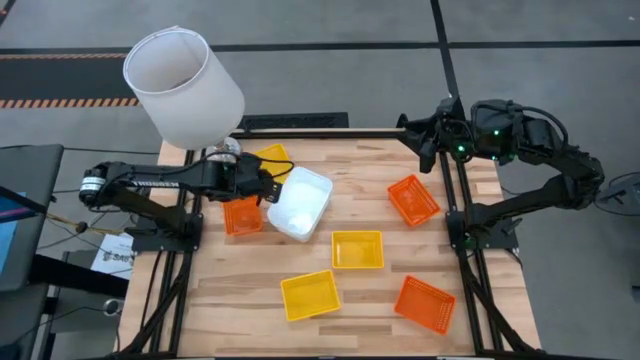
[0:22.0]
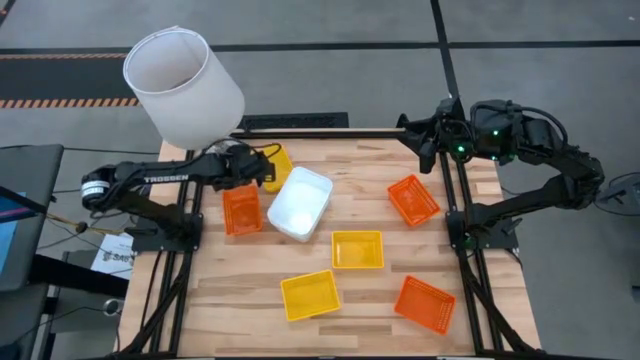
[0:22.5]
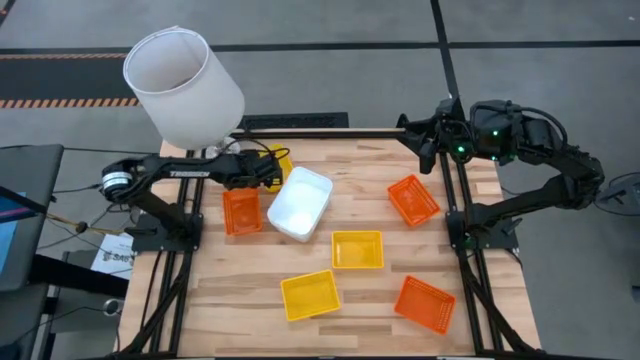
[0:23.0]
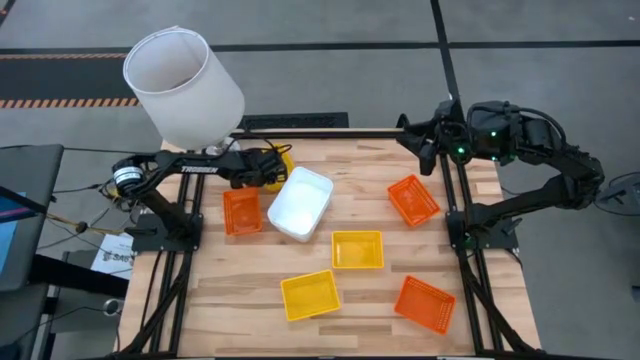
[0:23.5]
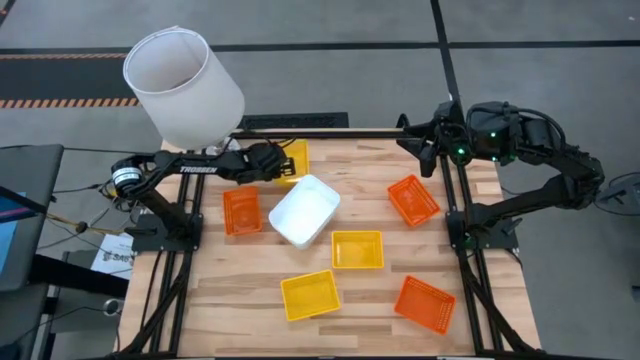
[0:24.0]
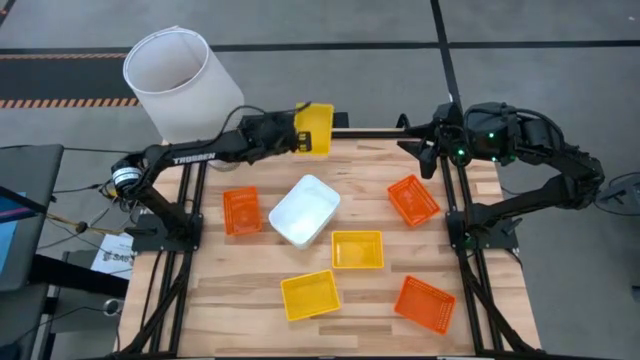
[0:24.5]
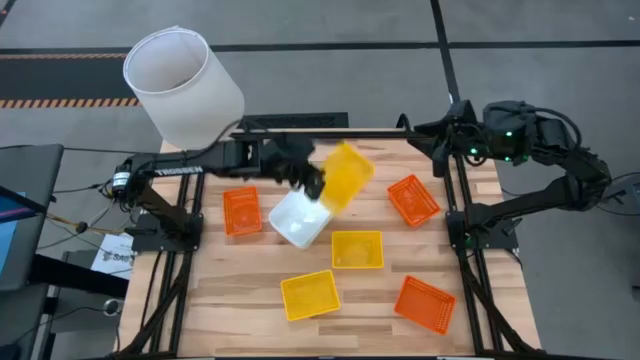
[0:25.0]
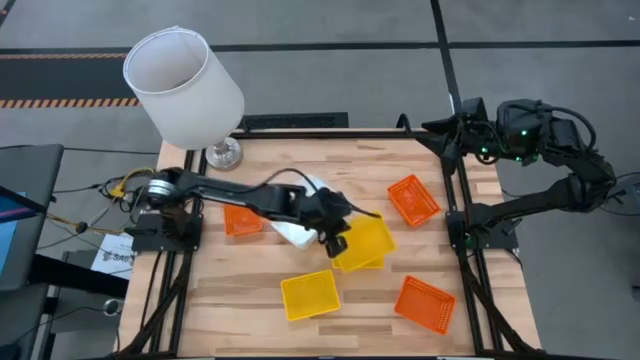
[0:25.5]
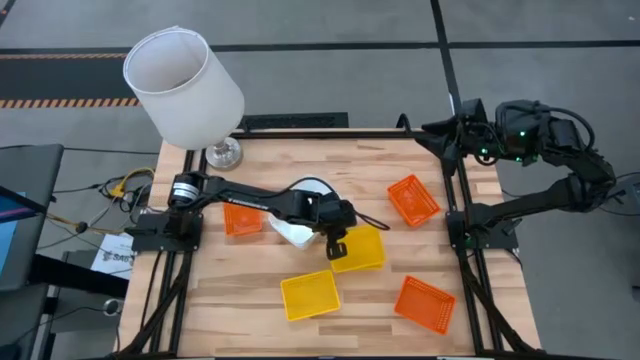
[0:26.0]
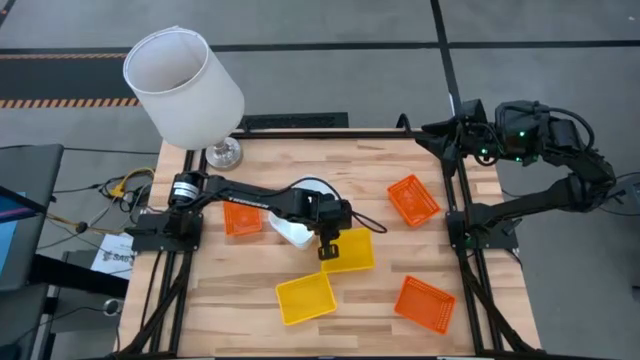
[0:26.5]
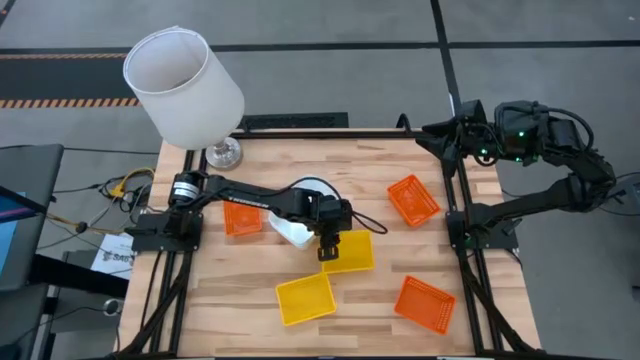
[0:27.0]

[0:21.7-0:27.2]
Stack the top yellow bin on top of the middle yellow bin

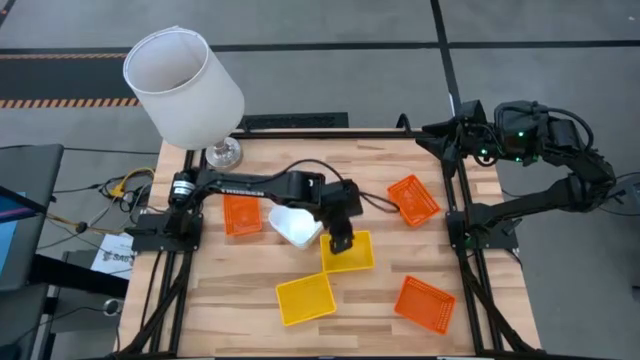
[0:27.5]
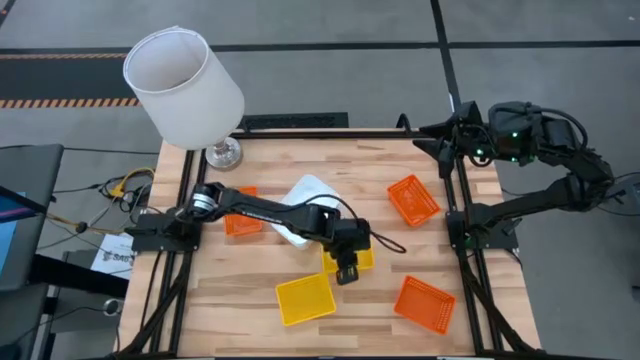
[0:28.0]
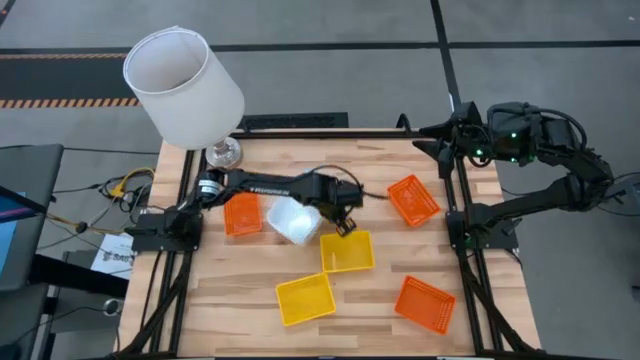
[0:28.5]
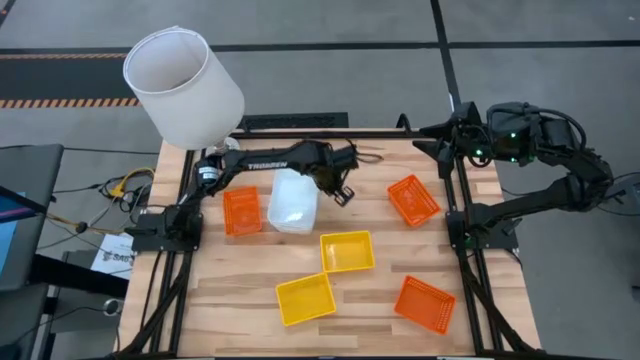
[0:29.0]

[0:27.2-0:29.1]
Adjust the stacked white bins

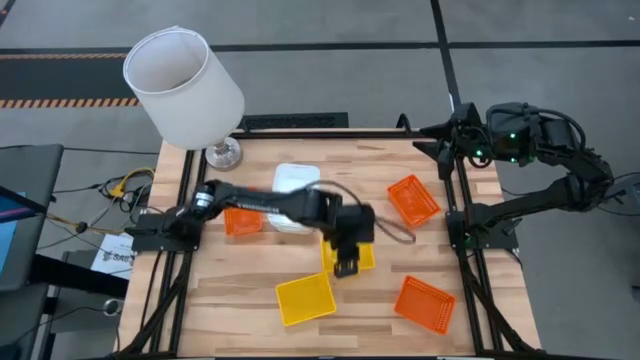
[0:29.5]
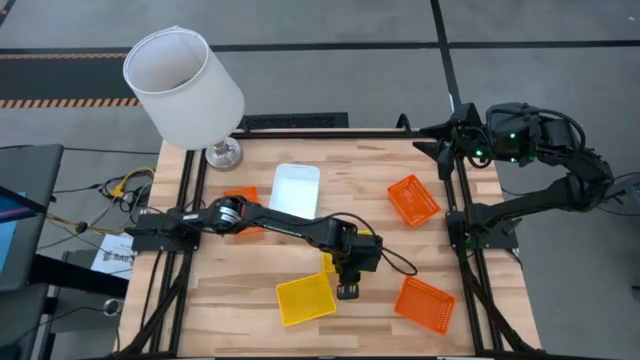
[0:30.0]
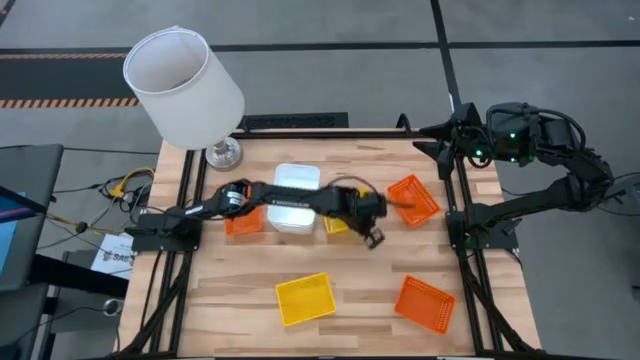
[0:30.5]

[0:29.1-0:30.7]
Adjust the stacked yellow bins

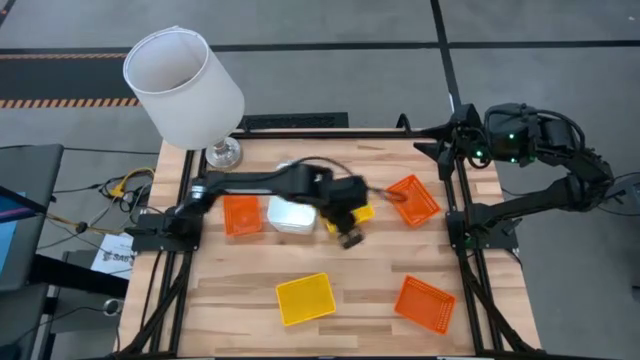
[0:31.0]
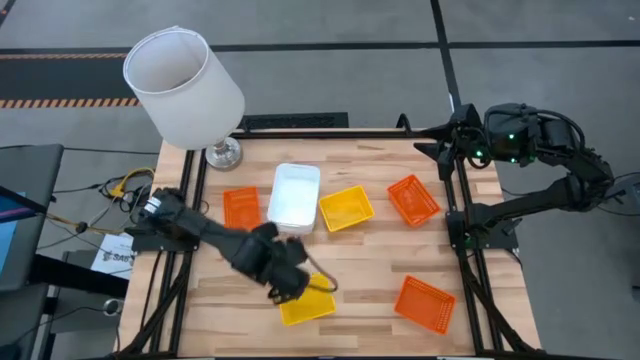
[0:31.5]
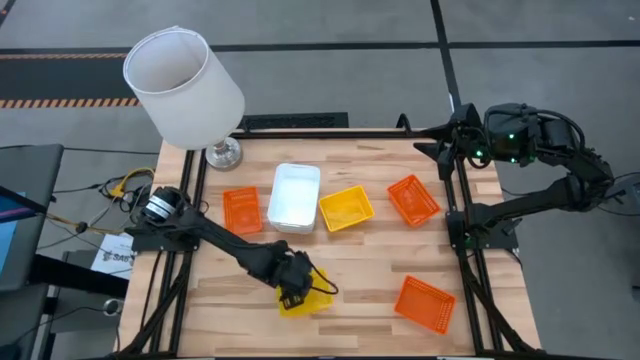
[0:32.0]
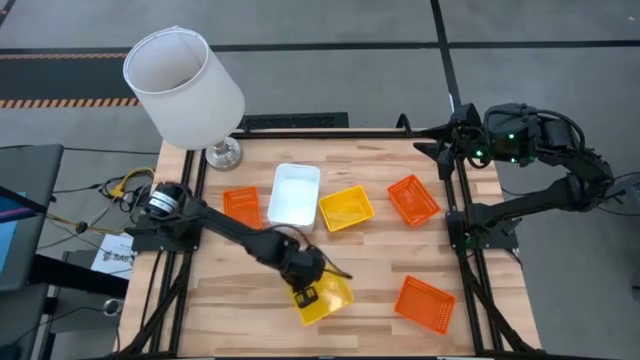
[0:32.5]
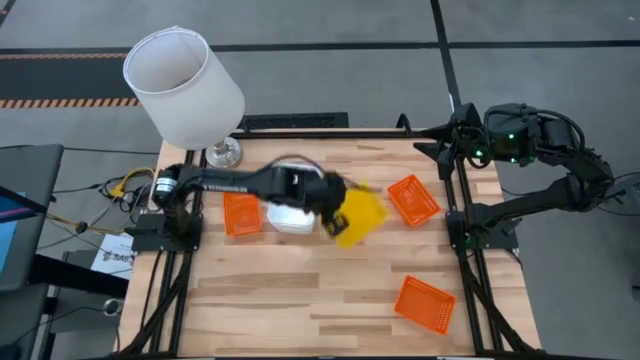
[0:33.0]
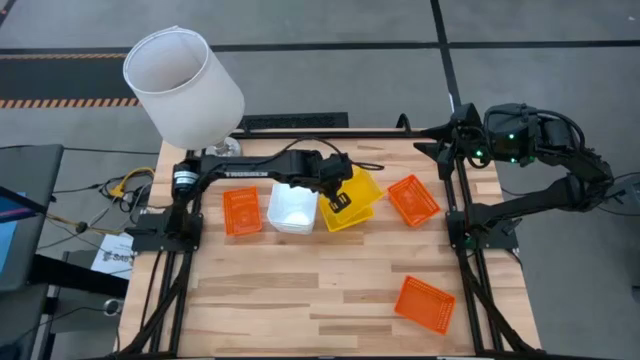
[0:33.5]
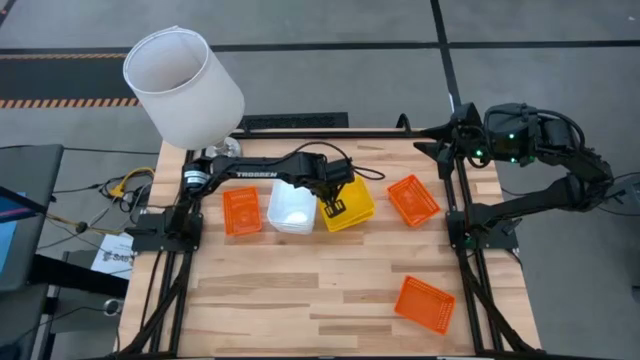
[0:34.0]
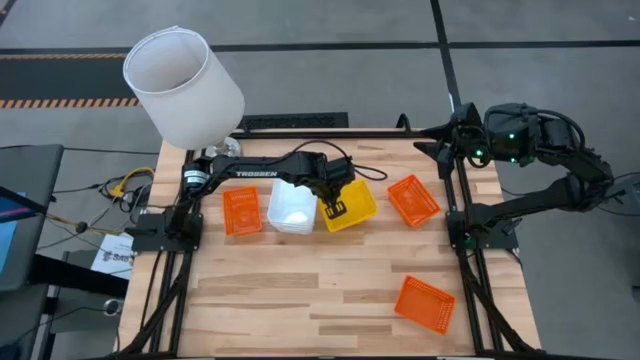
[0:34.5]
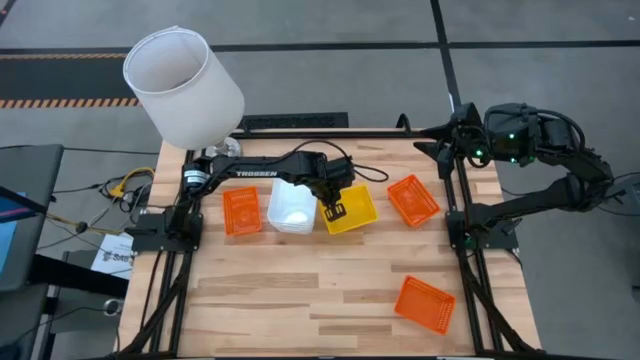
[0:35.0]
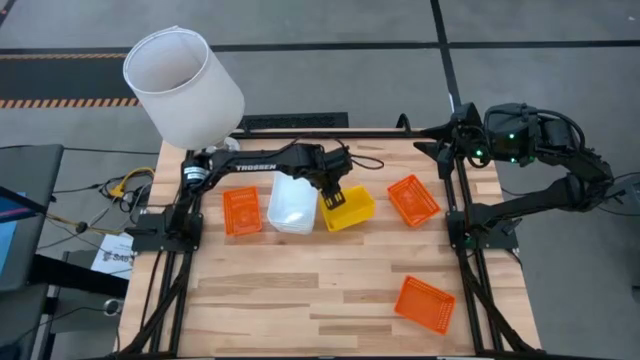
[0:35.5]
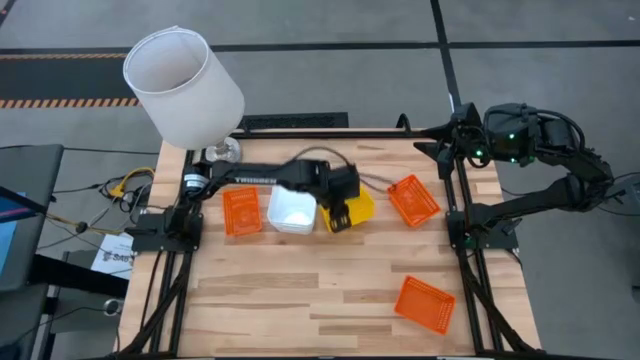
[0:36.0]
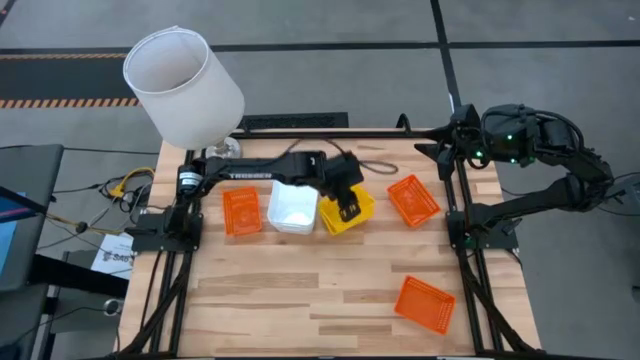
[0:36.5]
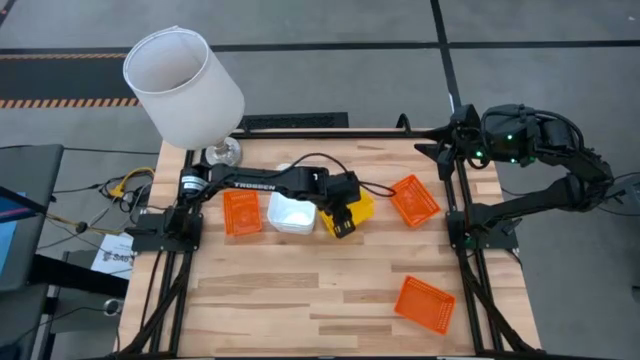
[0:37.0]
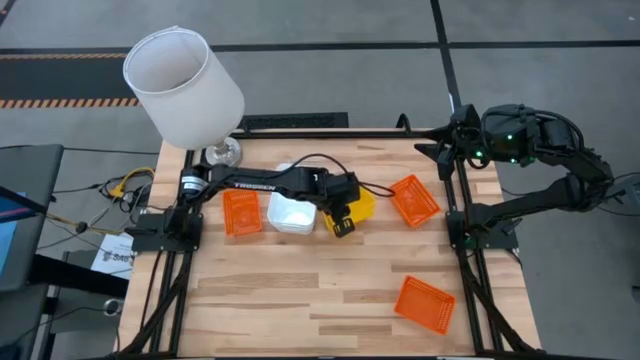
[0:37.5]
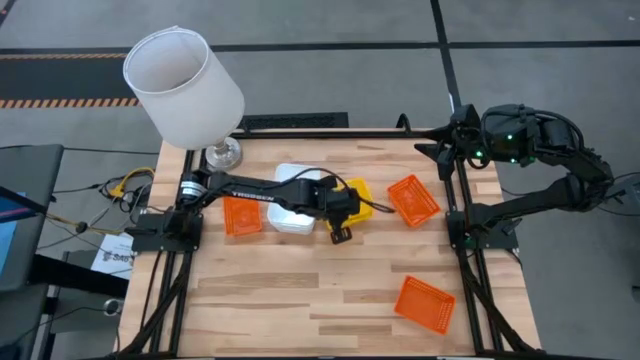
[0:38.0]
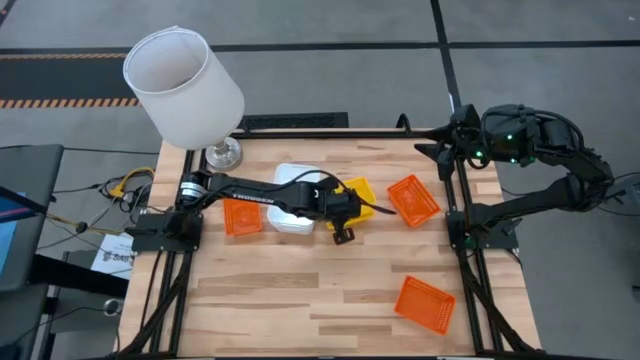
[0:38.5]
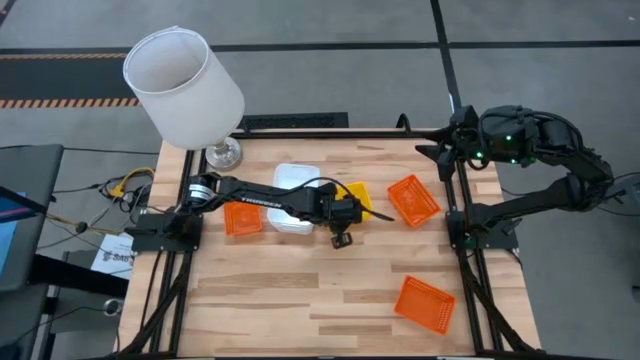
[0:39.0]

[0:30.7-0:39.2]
Stack the bottom yellow bin on top of the top yellow bin
